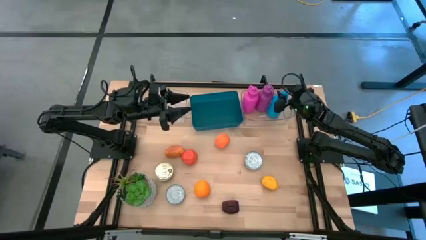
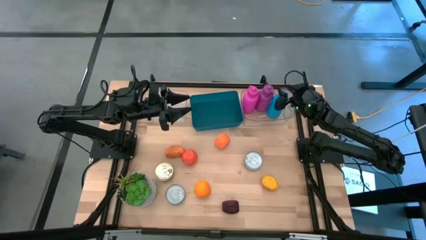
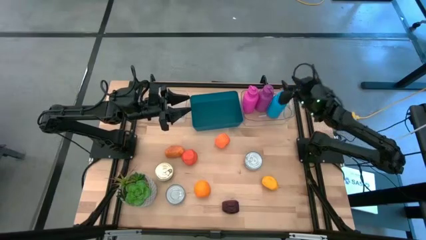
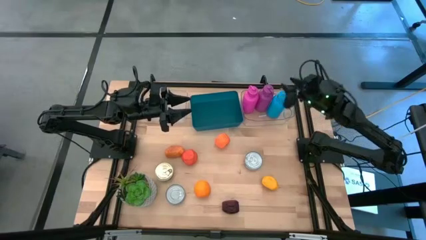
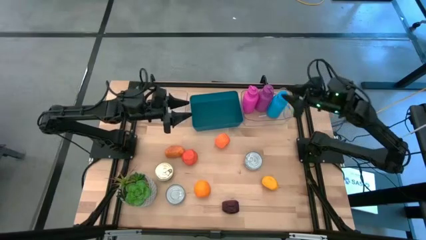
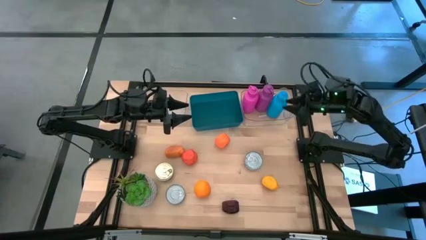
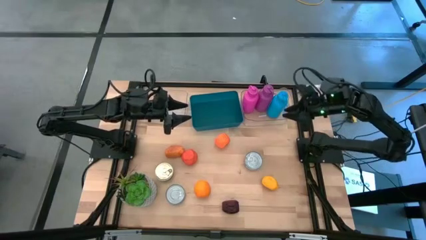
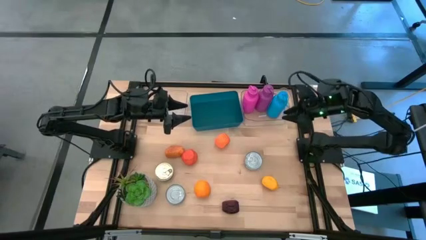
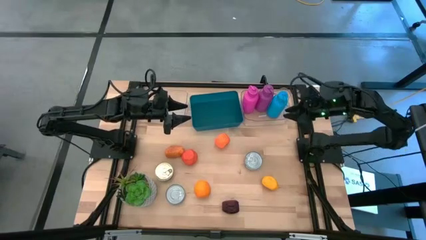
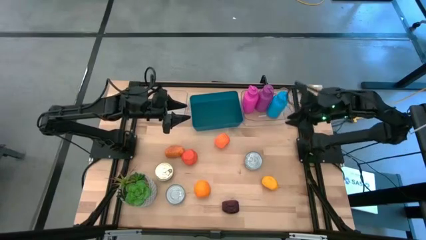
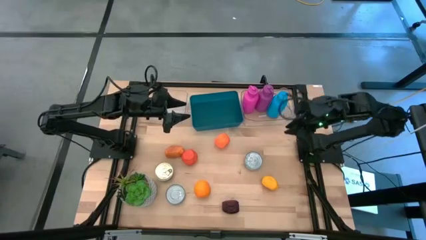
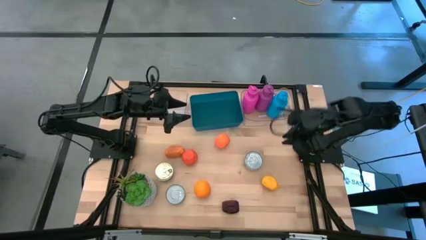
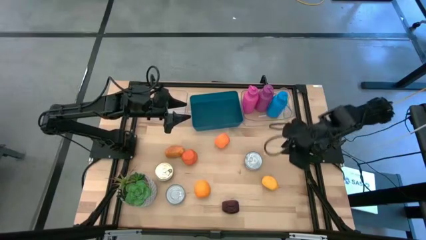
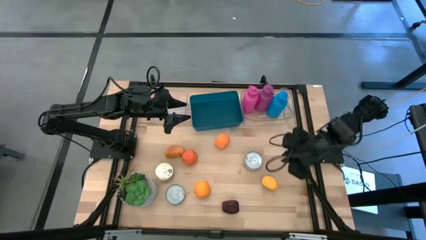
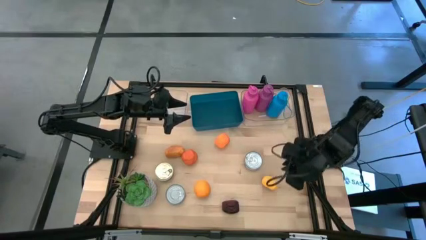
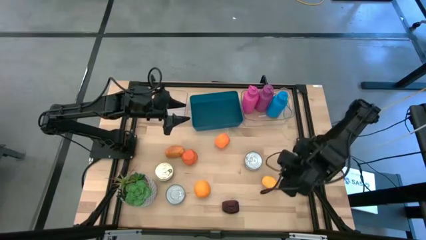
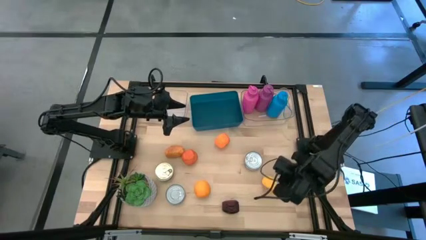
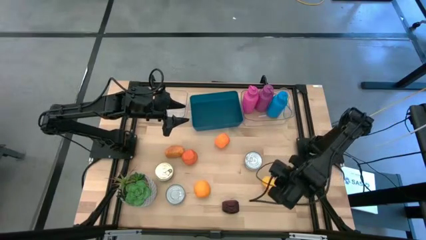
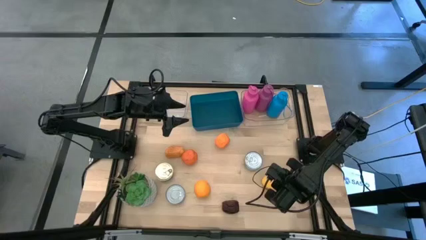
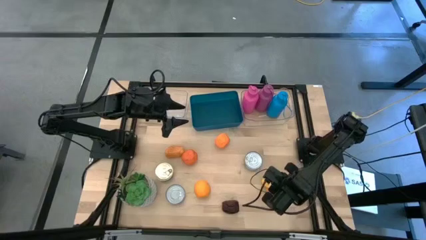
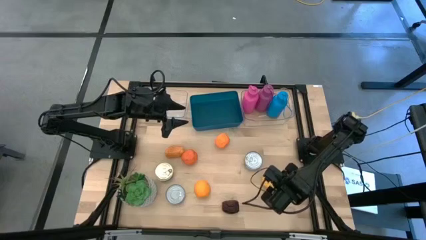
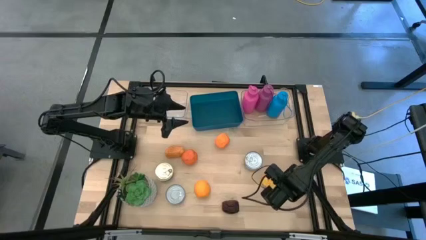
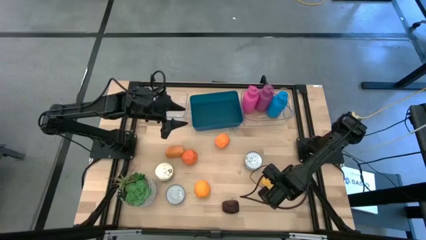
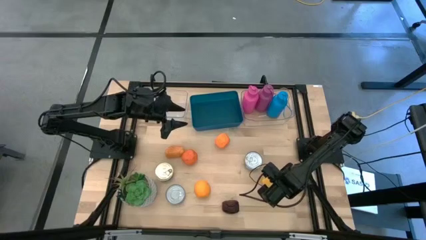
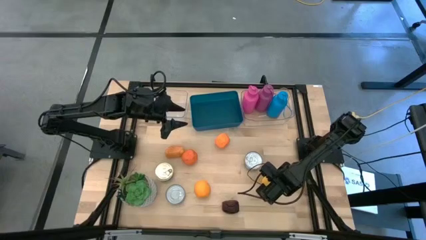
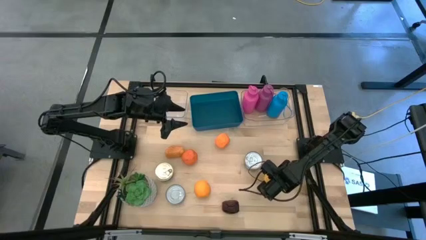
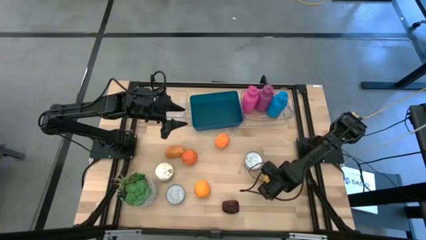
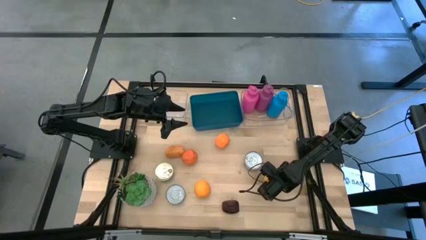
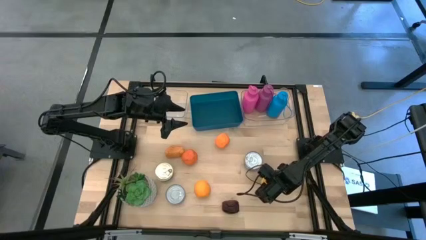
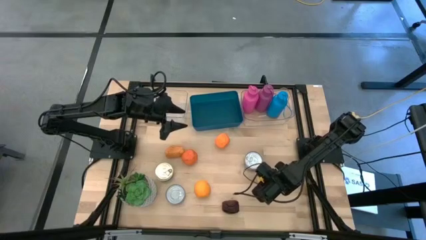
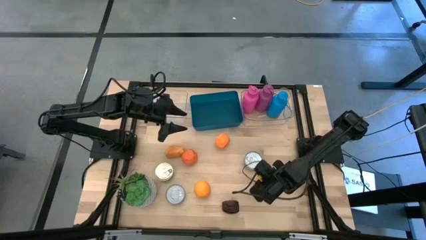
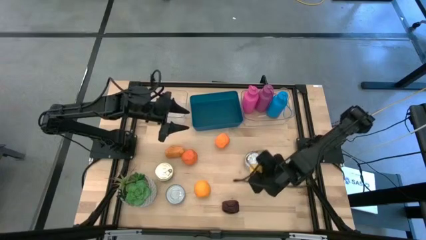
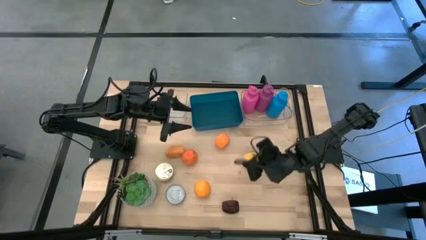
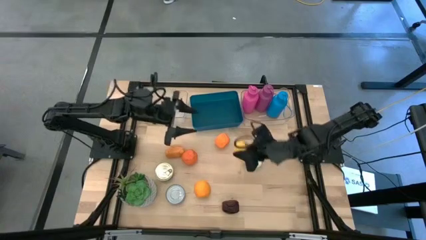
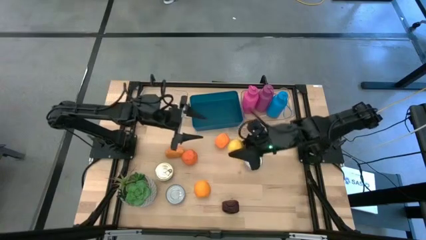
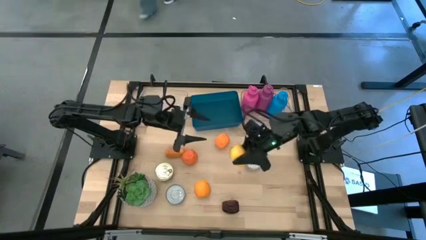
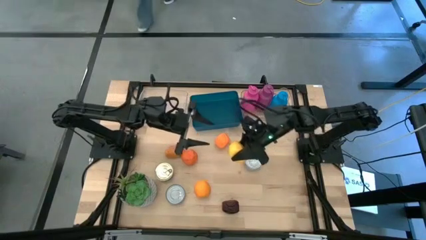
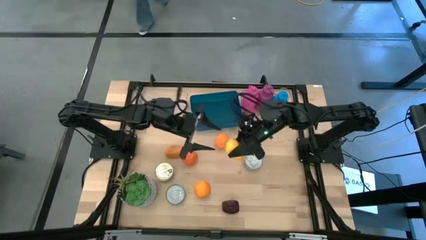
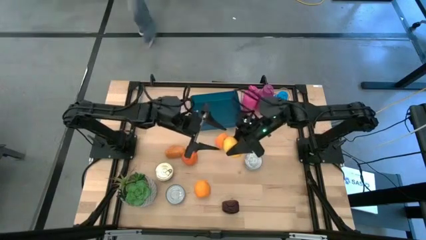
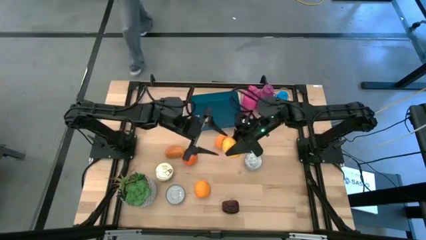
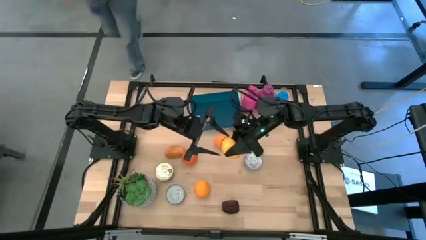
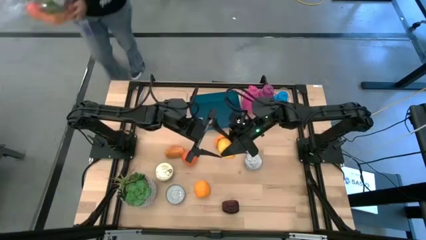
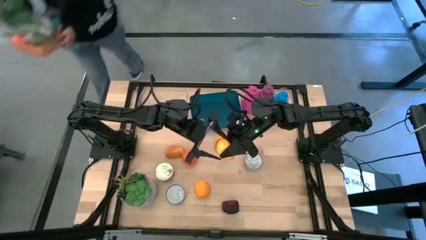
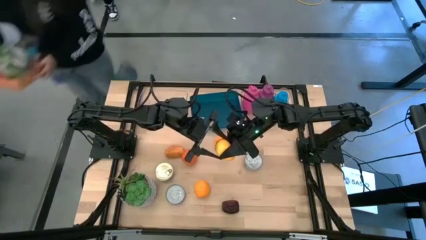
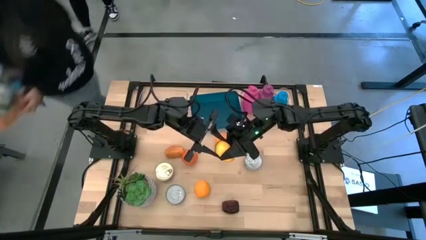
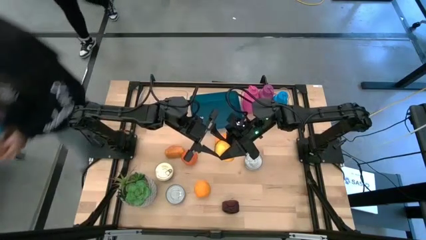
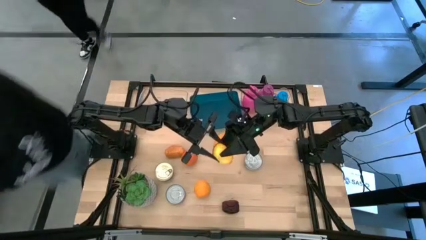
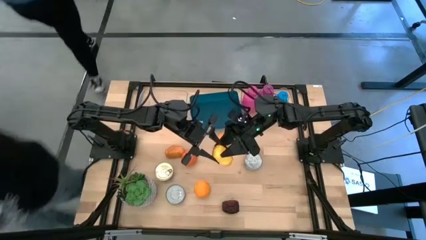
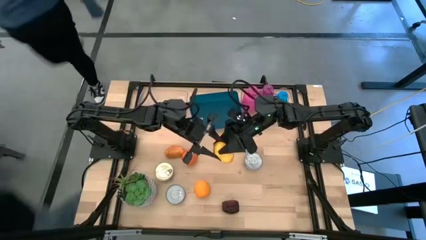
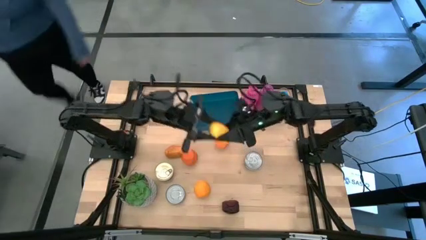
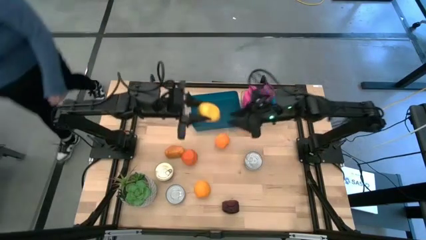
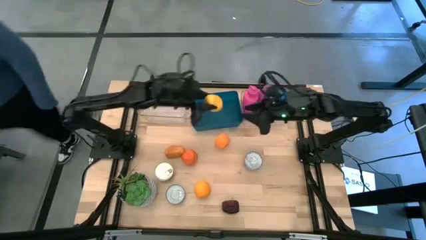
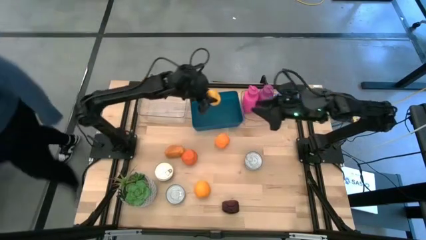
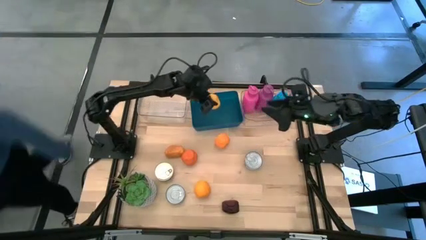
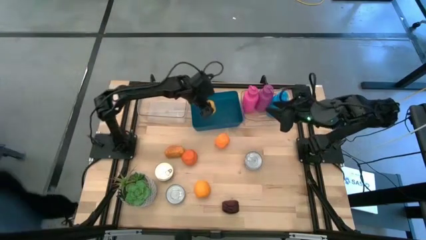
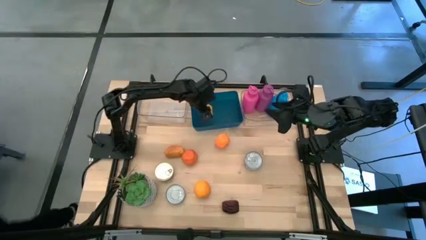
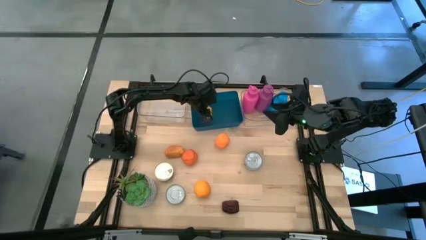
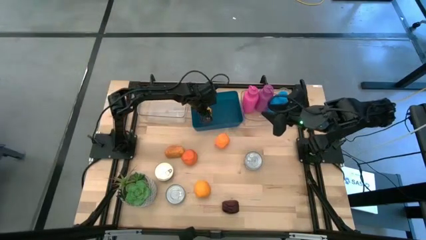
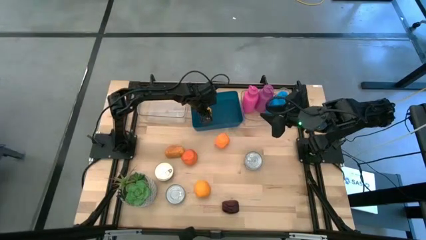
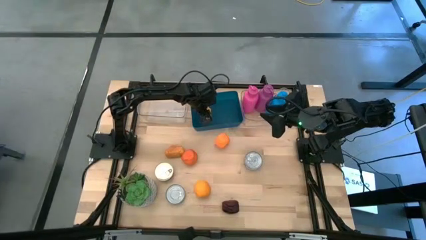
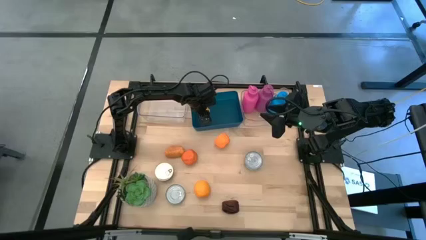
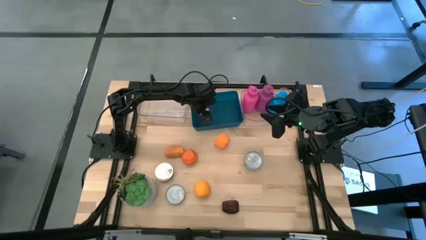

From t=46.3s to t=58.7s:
Task: Pick & Place Food Item
Put the lemon into the blue bin

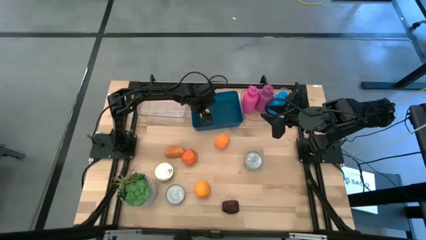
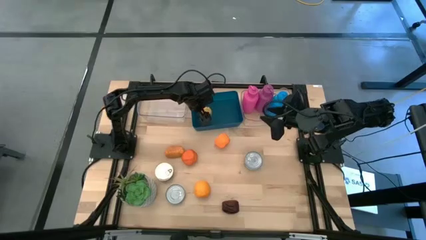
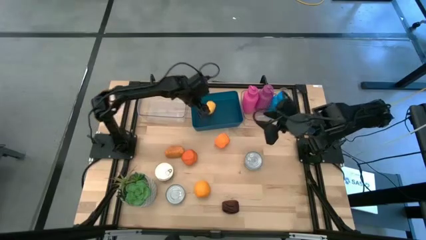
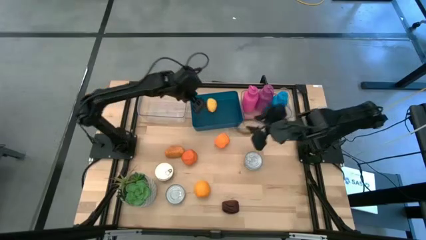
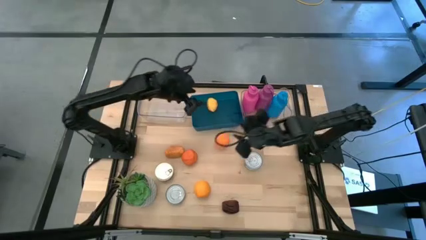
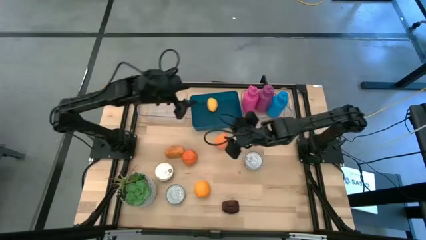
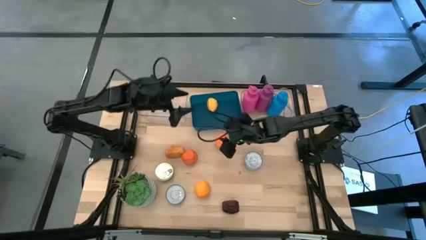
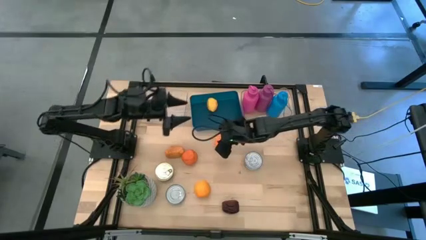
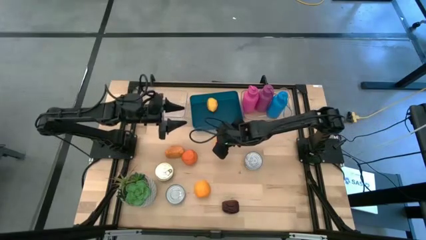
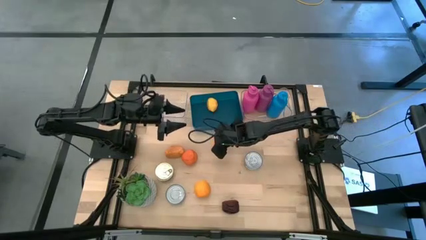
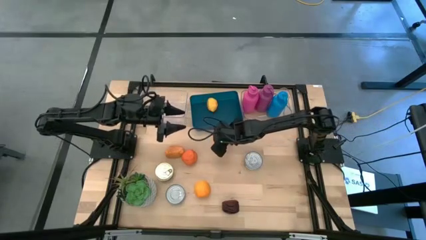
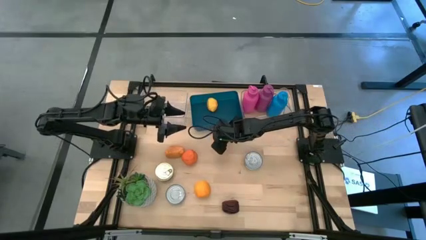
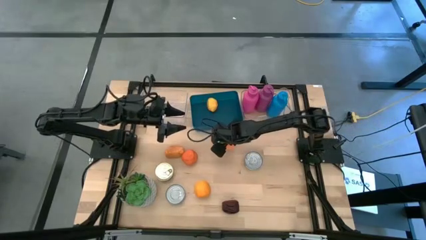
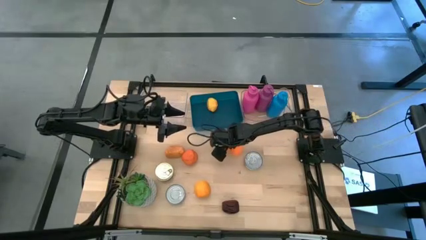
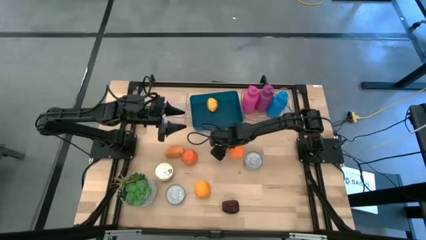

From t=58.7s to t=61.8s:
Put the right orange into the blue bin
